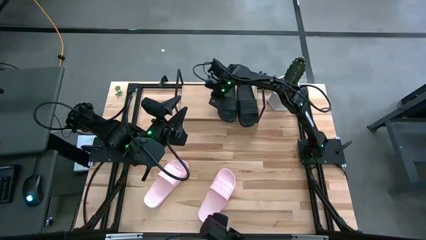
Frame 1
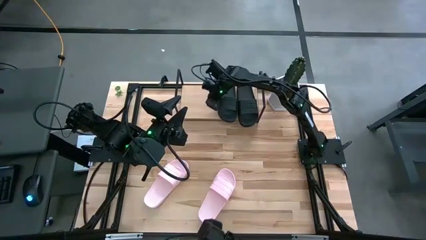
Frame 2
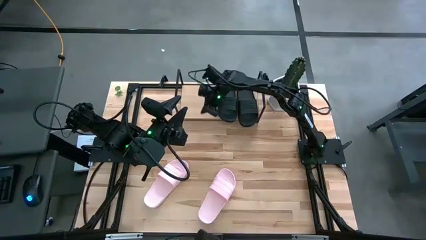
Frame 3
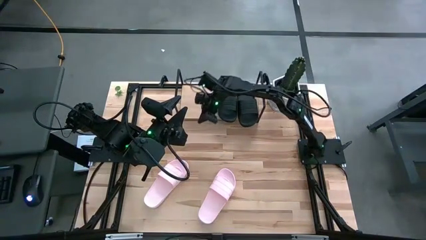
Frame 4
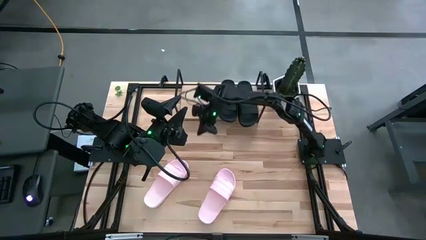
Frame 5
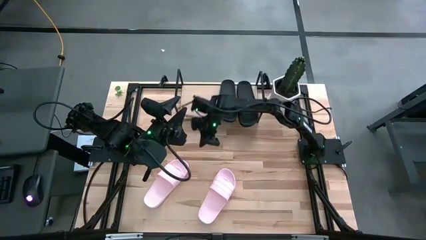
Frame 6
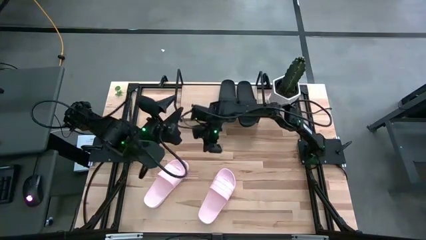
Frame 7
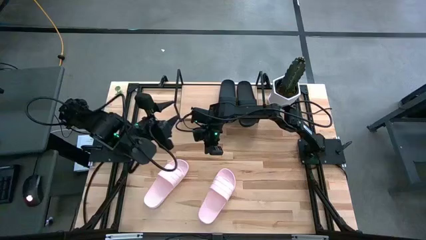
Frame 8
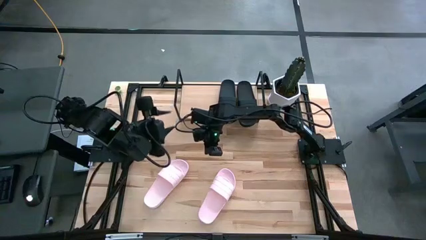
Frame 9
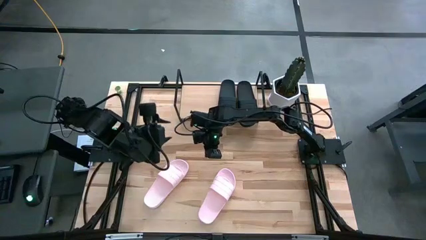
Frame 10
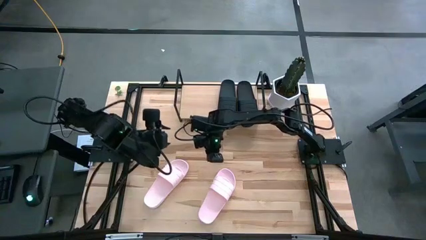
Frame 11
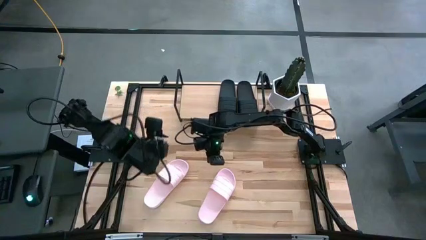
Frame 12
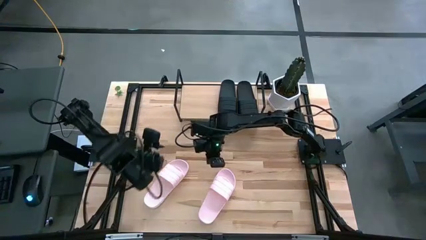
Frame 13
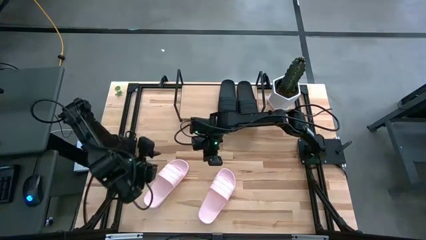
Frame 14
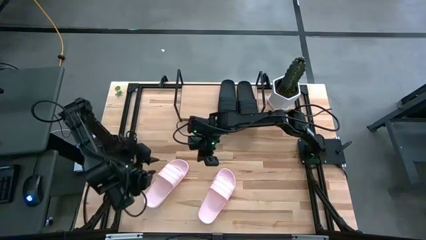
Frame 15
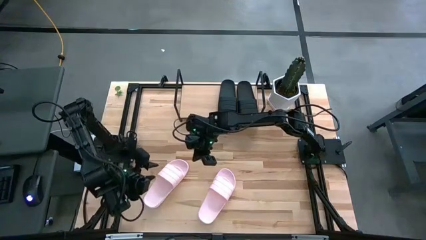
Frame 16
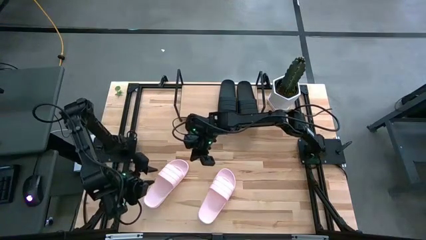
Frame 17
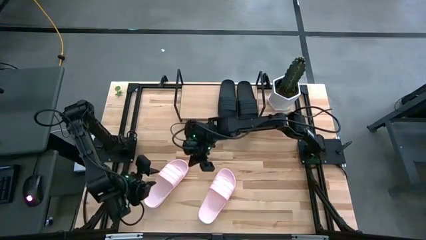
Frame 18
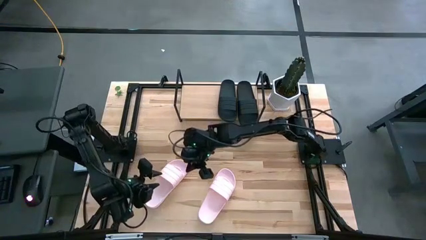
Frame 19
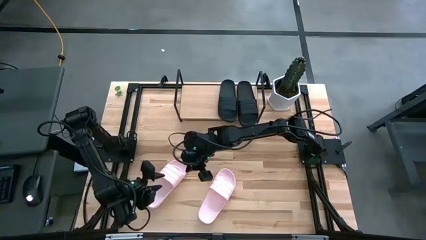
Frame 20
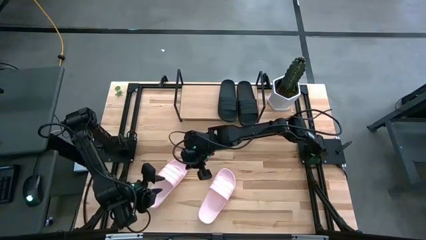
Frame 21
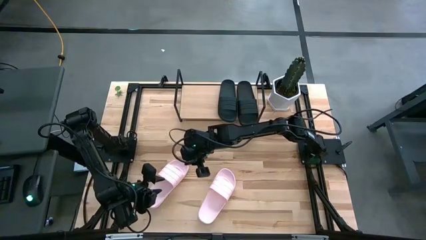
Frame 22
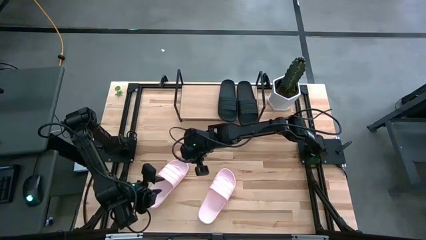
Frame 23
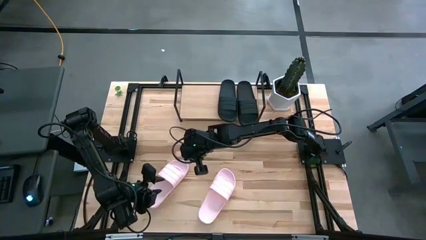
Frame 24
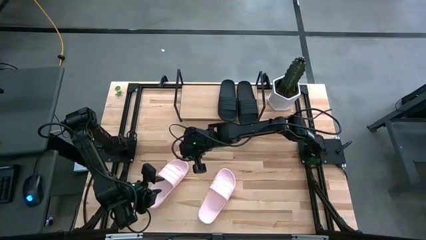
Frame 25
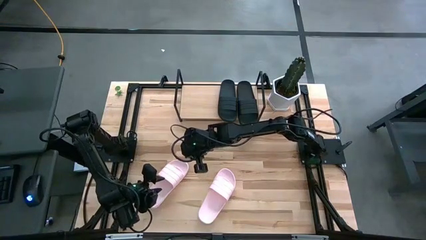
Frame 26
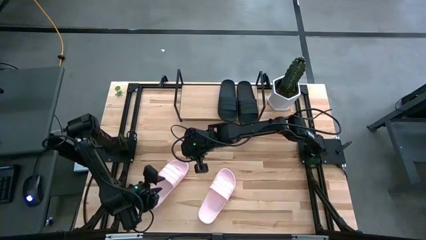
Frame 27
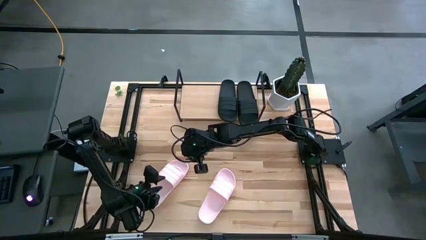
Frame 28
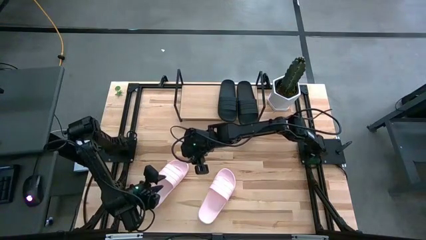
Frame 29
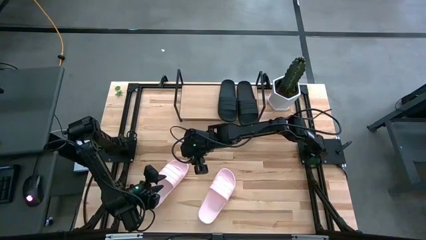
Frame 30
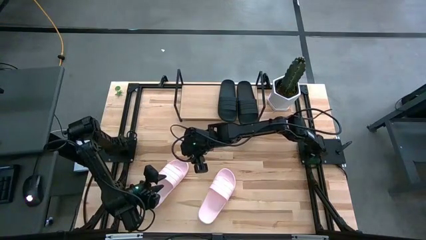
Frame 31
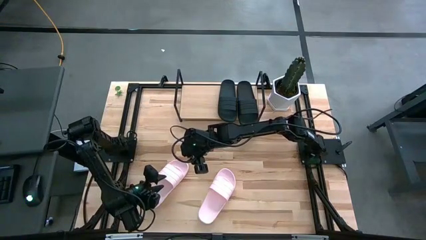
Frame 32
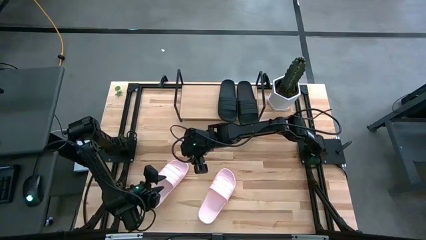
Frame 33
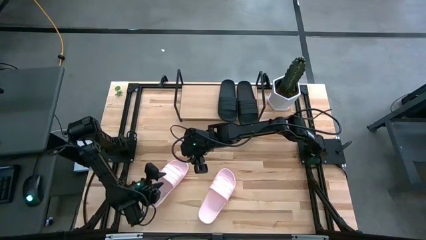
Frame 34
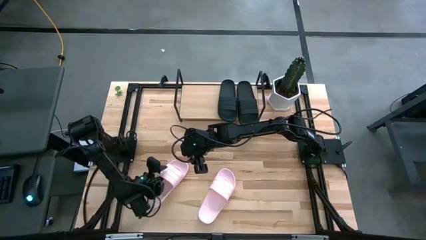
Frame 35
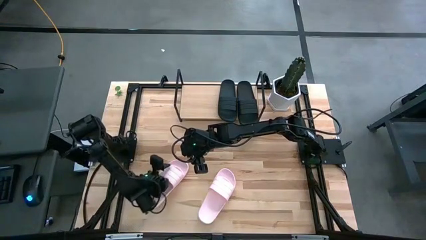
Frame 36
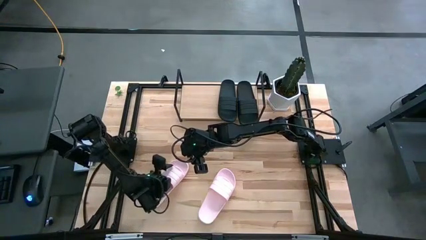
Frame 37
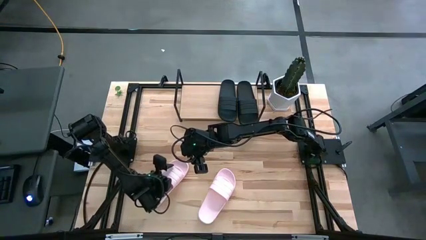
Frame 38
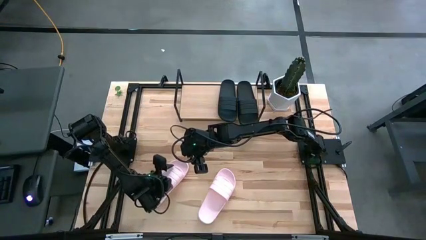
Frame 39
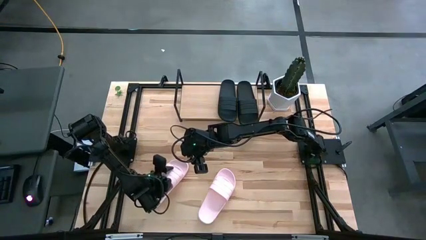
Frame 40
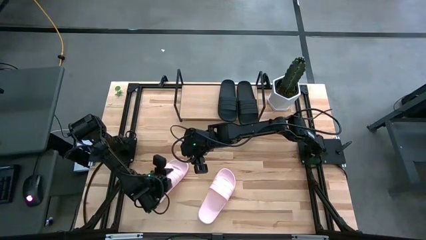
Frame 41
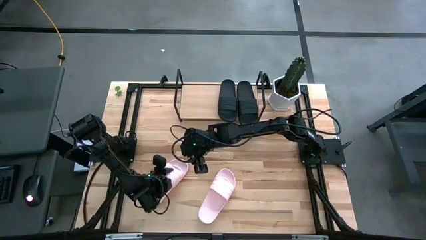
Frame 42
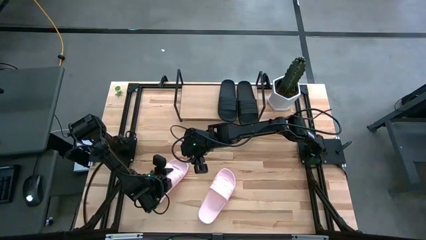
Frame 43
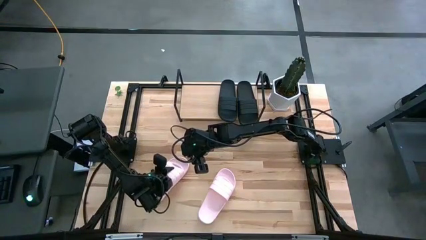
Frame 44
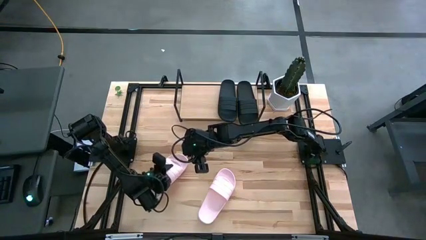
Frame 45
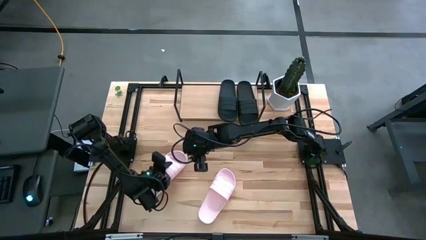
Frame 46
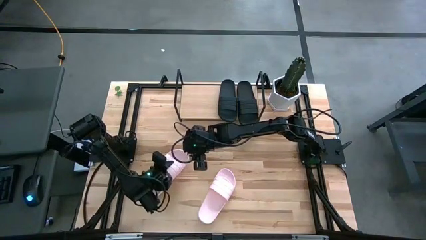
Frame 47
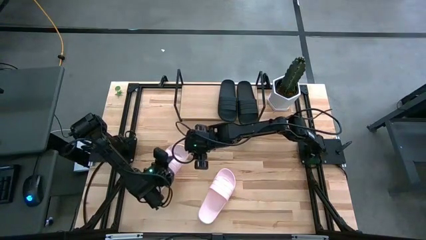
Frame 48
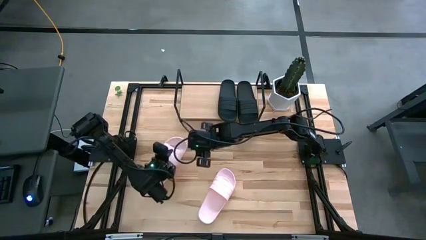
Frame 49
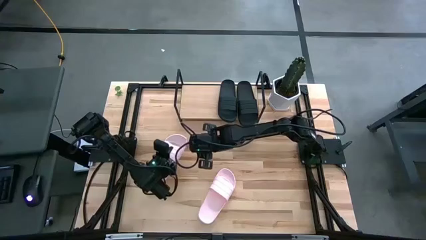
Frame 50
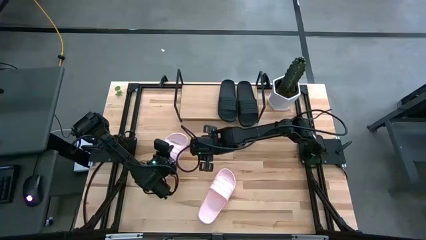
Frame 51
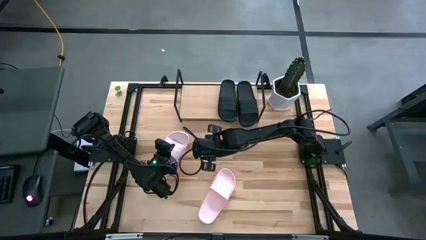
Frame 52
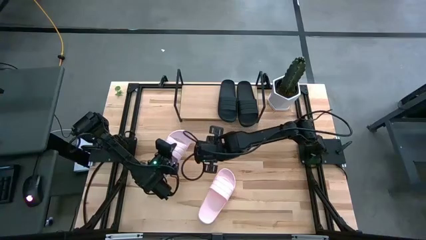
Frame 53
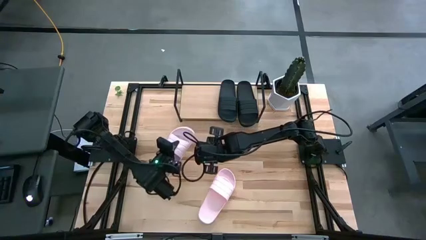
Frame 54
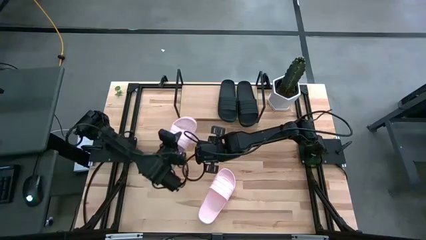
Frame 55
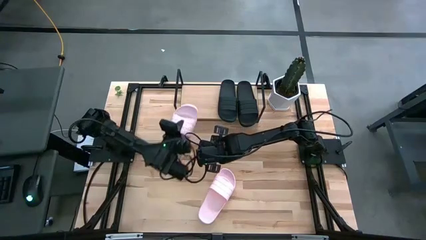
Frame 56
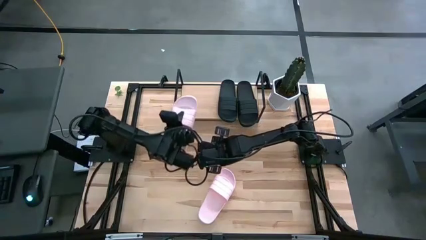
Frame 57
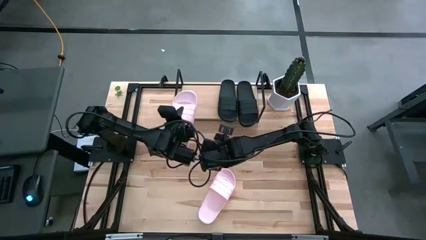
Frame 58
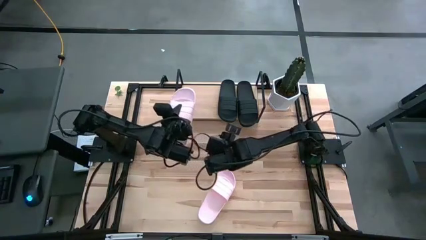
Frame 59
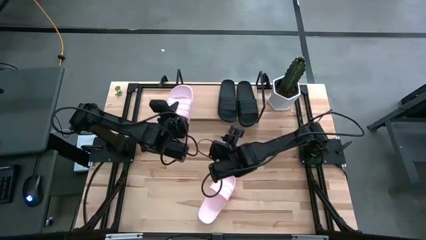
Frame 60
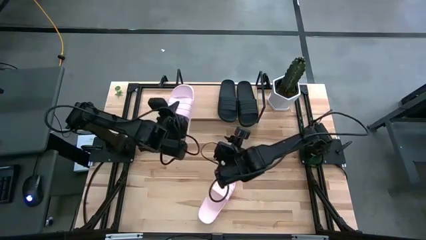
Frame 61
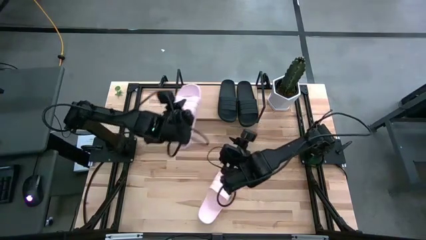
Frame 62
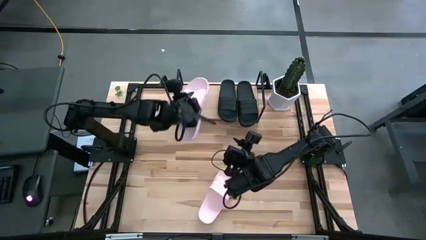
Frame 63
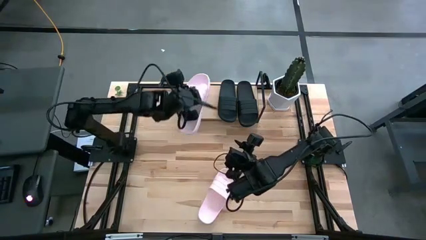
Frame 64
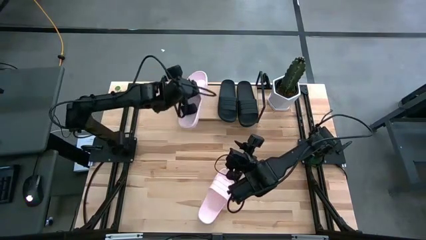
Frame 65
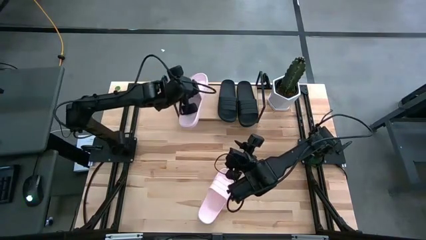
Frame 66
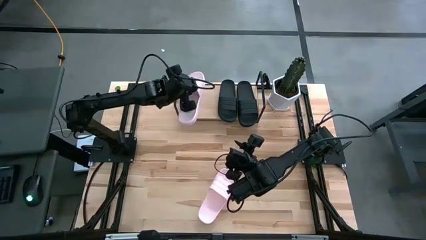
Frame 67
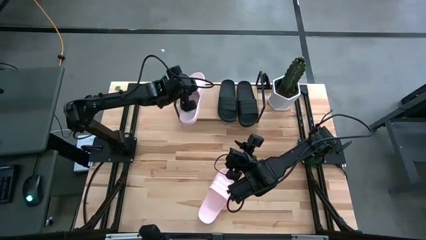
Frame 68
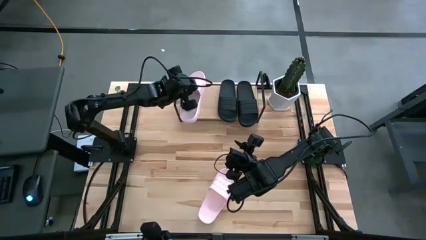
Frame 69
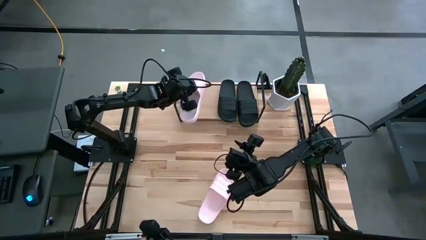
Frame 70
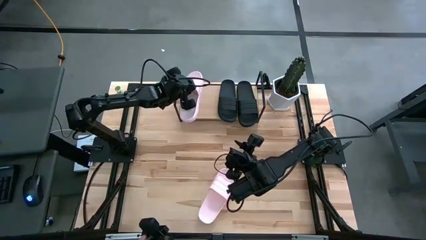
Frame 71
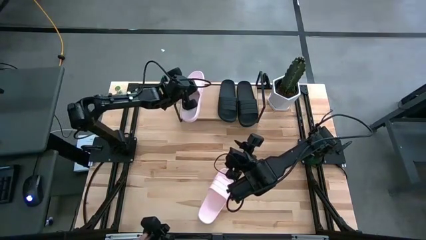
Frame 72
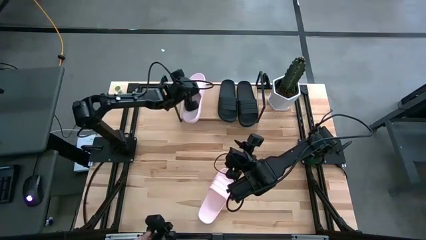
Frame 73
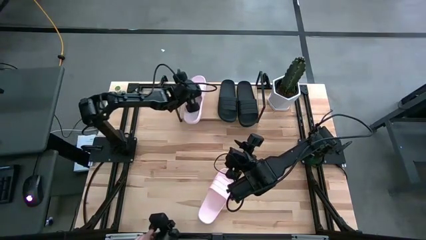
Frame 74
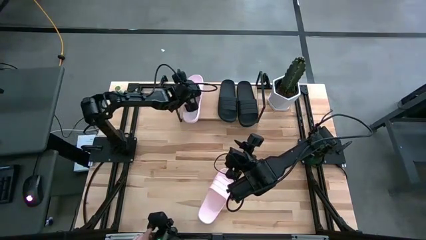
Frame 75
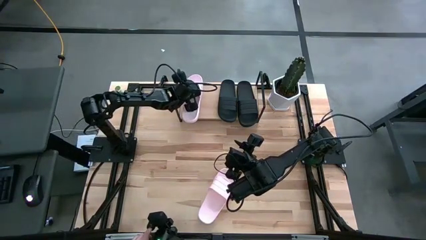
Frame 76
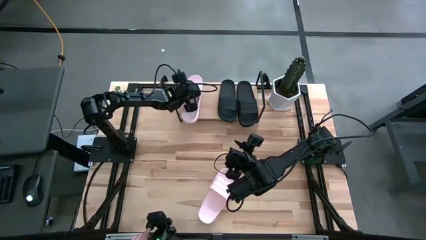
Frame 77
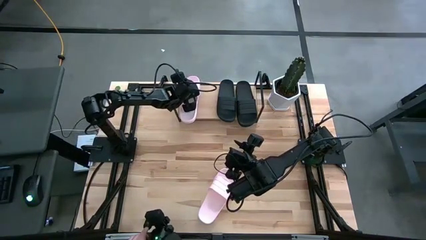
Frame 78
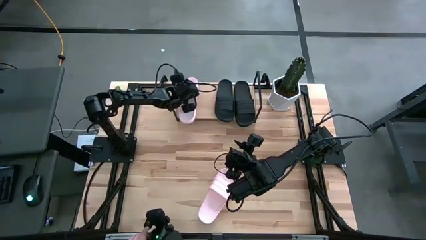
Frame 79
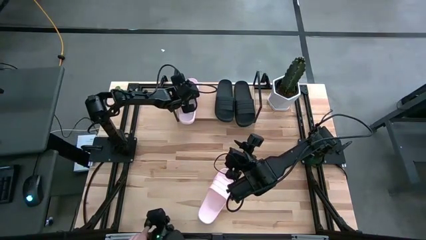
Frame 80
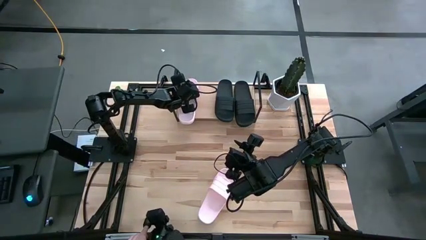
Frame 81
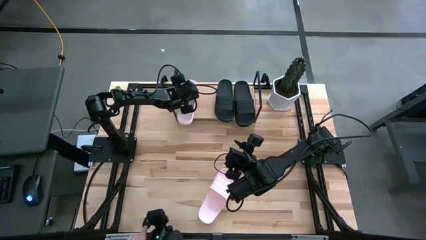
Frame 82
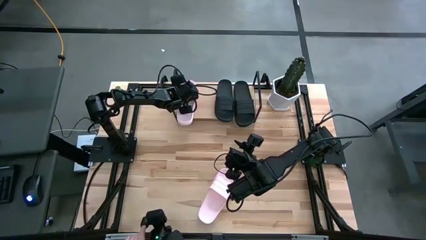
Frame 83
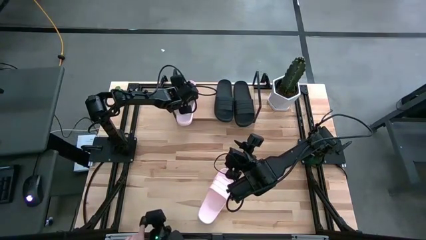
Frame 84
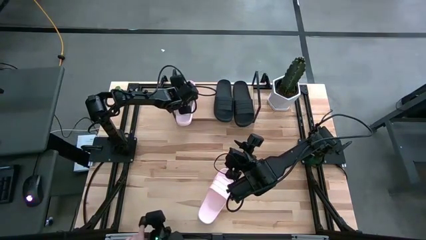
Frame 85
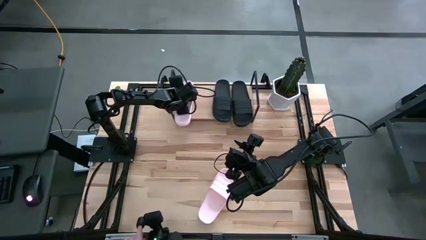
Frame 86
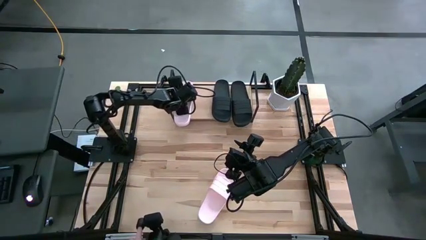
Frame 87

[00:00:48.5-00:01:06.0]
Task: Pick and place slides into the shelf
Put the left pink slide on the shelf
